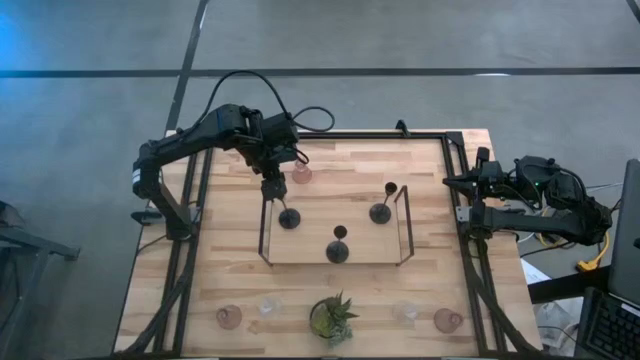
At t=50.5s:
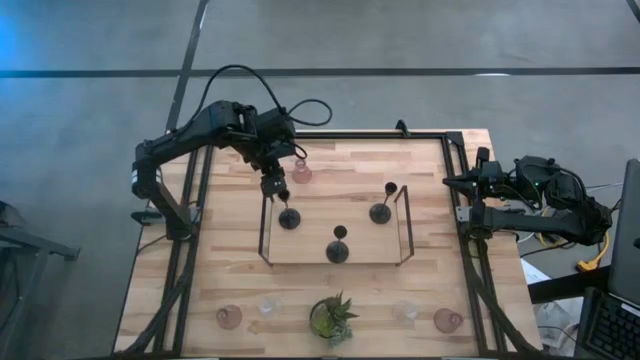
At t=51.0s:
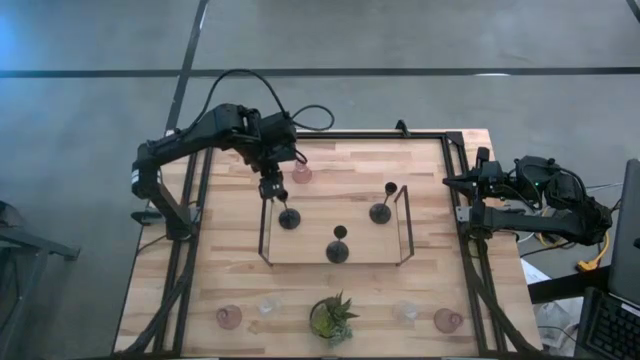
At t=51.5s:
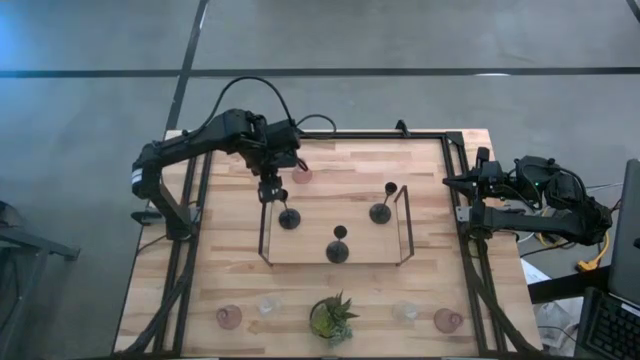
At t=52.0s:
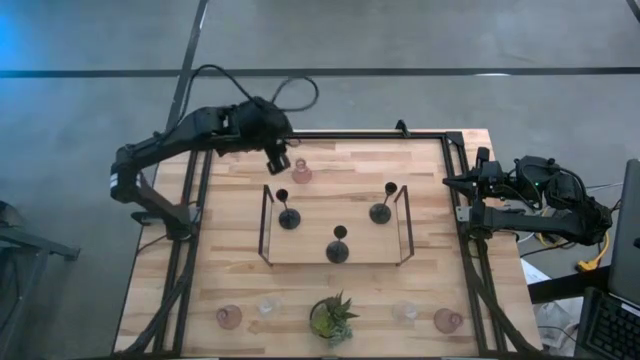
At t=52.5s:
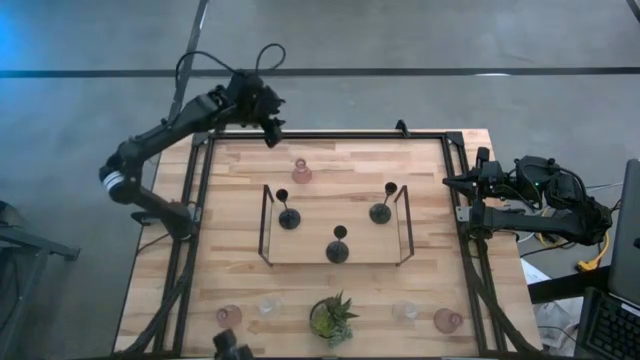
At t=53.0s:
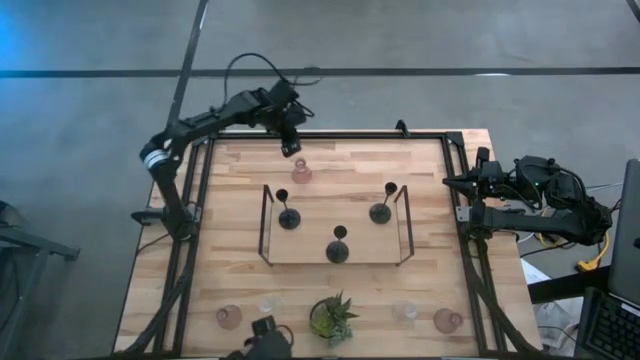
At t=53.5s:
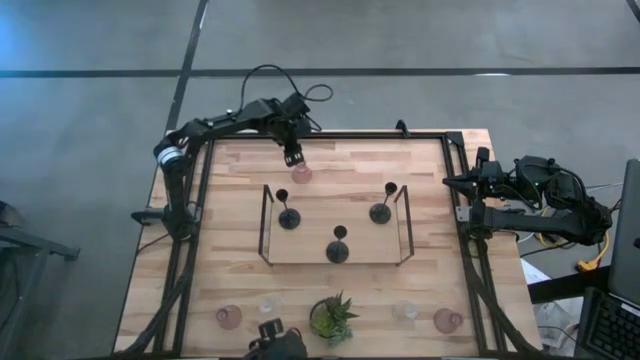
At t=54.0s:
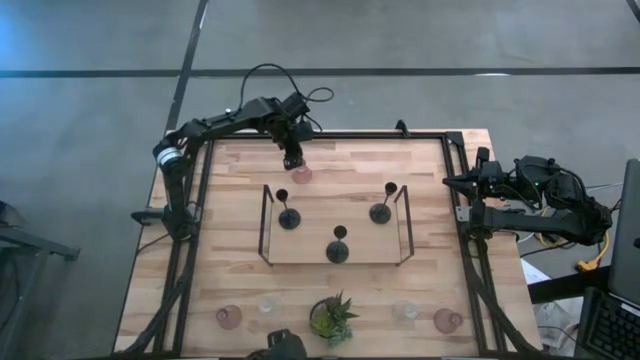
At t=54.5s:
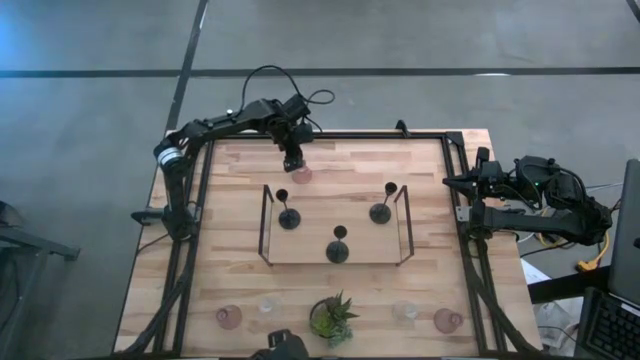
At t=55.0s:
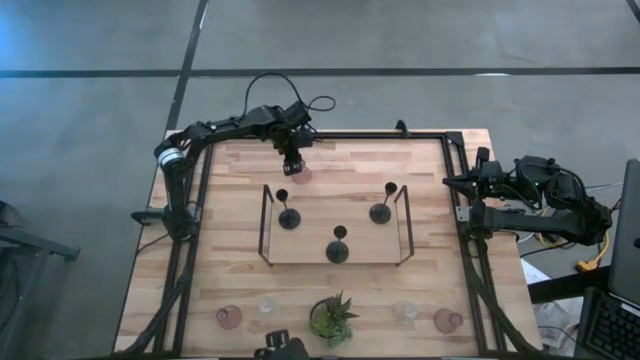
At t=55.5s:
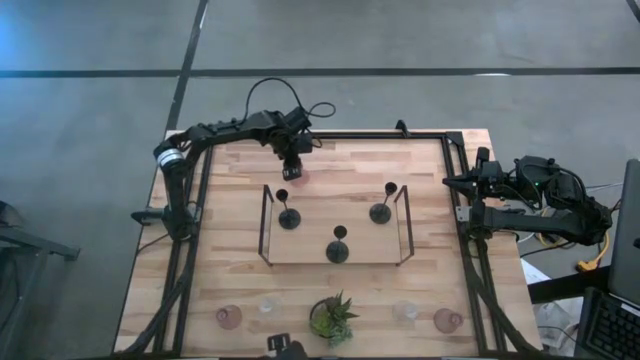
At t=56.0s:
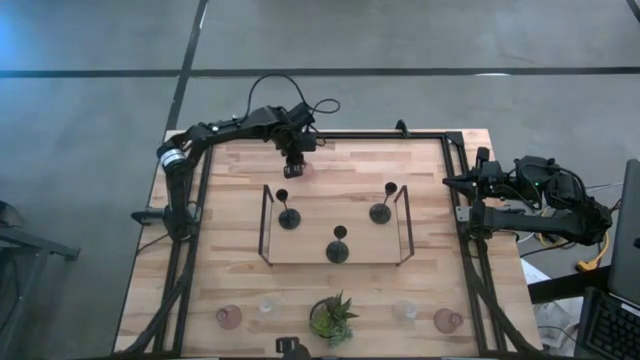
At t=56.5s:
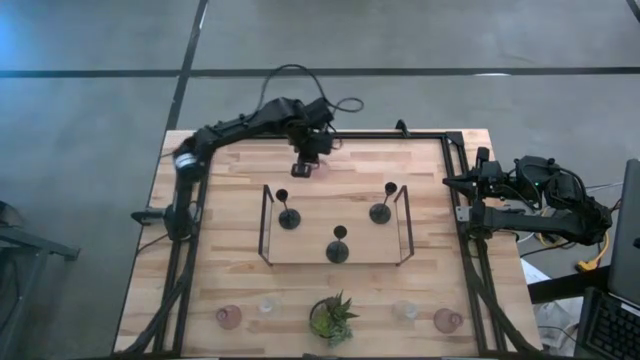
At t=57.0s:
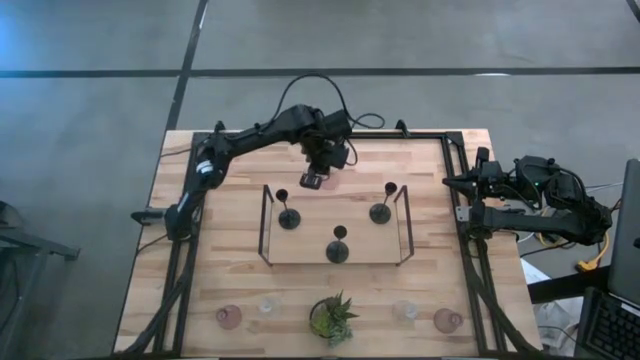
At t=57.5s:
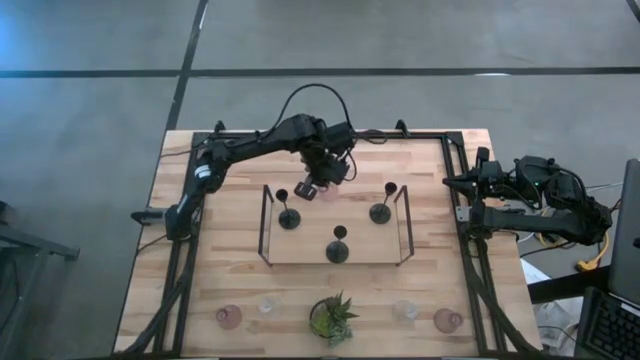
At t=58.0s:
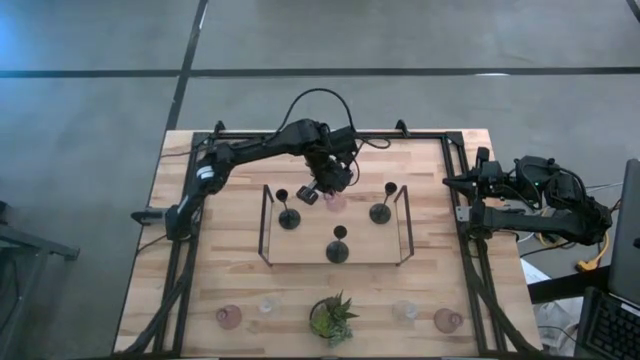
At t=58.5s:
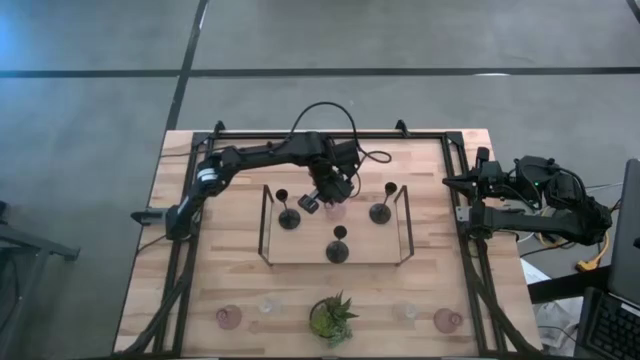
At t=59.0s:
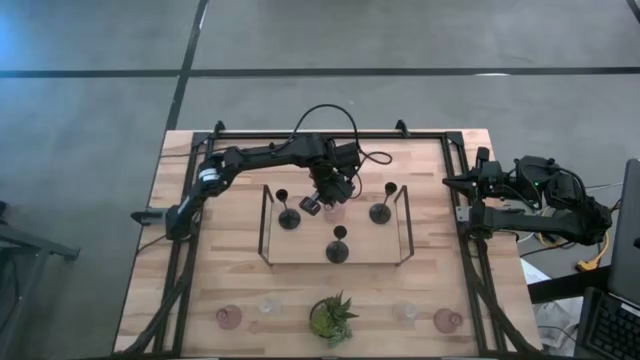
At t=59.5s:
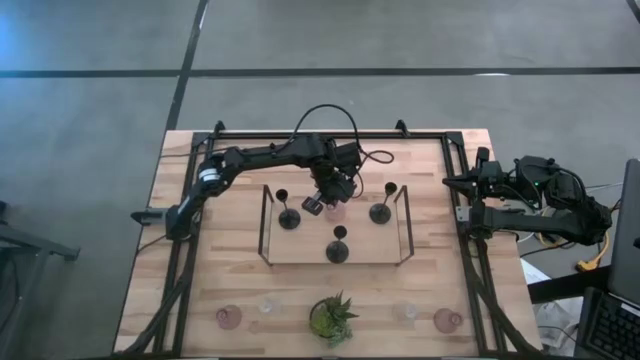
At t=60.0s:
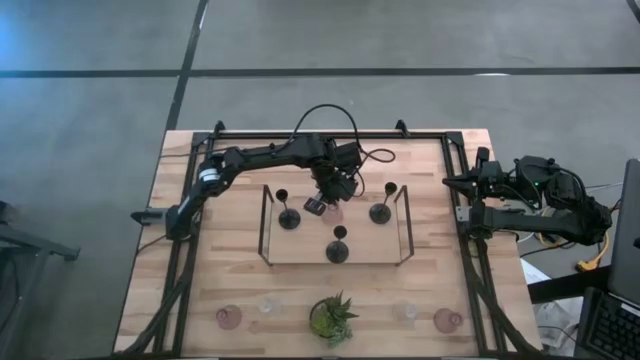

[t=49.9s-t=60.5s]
Task: Pick & Place candle stick holders
Put the top pink glass candle holder on the shelf

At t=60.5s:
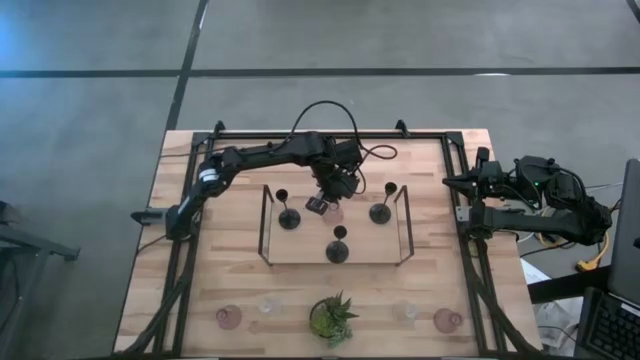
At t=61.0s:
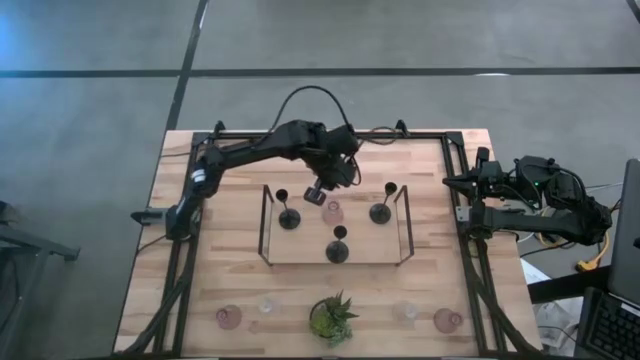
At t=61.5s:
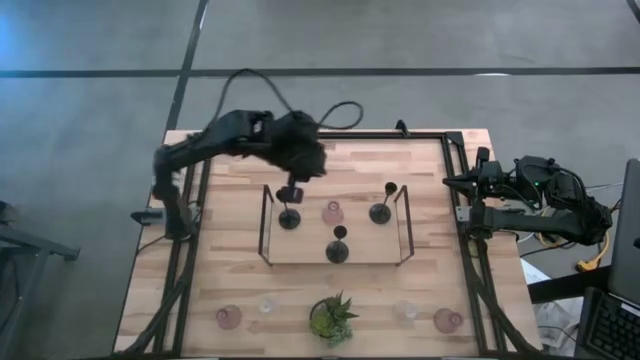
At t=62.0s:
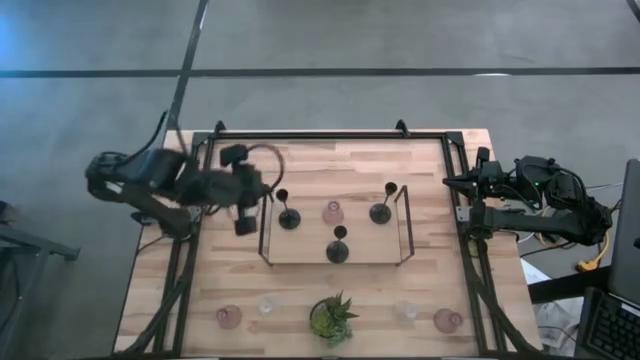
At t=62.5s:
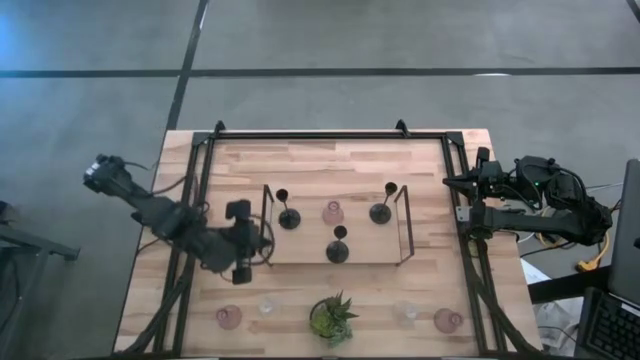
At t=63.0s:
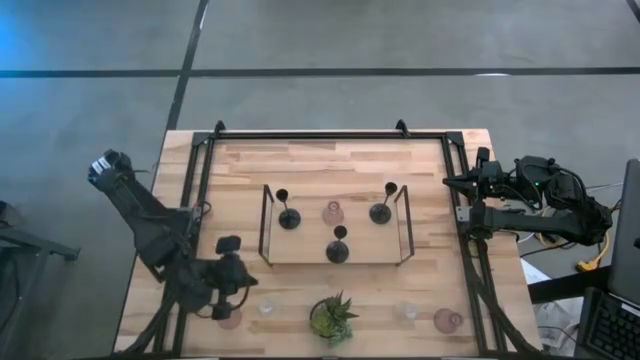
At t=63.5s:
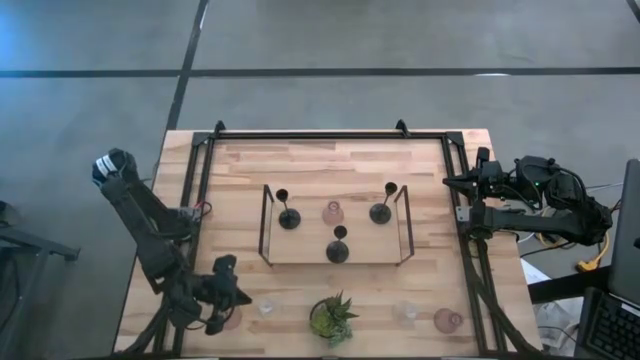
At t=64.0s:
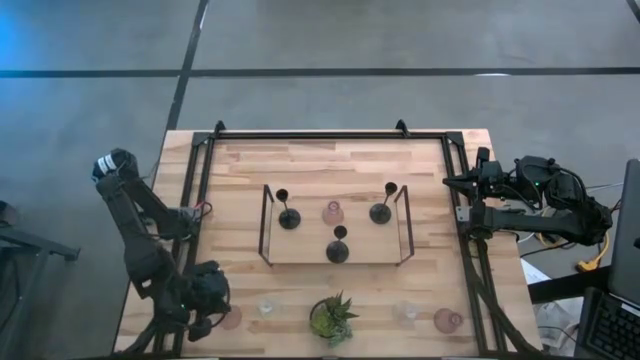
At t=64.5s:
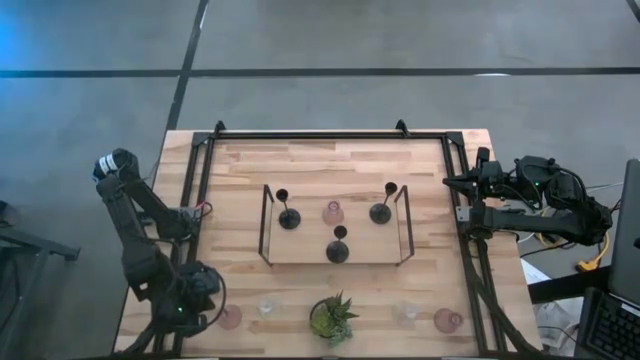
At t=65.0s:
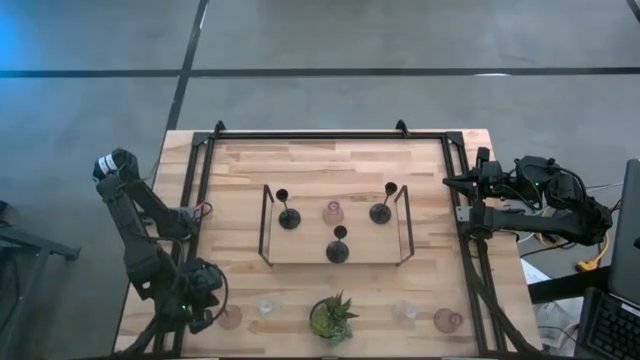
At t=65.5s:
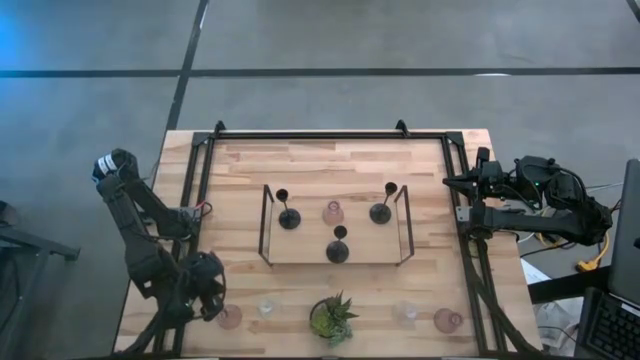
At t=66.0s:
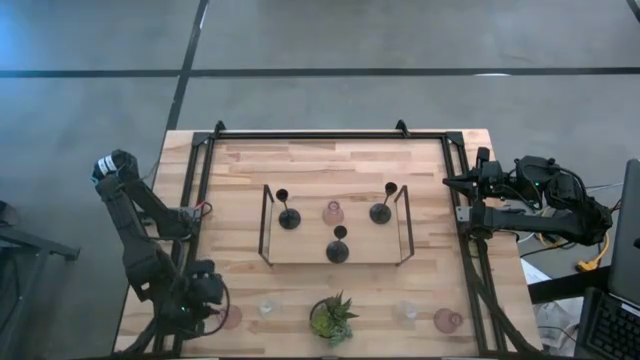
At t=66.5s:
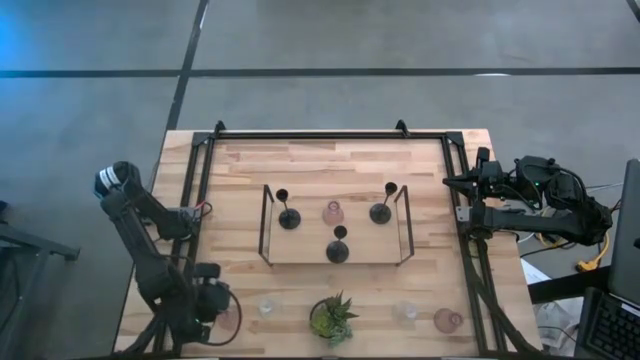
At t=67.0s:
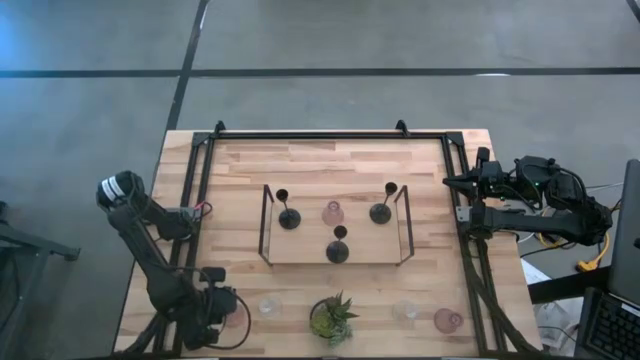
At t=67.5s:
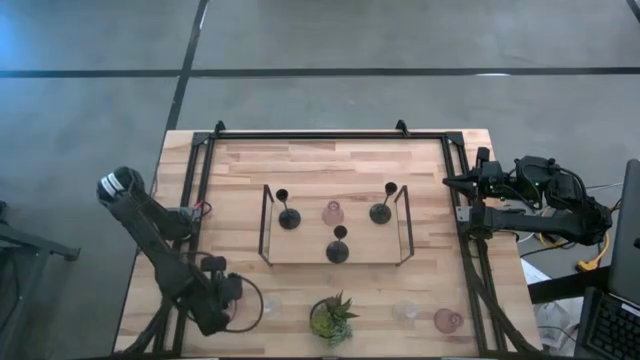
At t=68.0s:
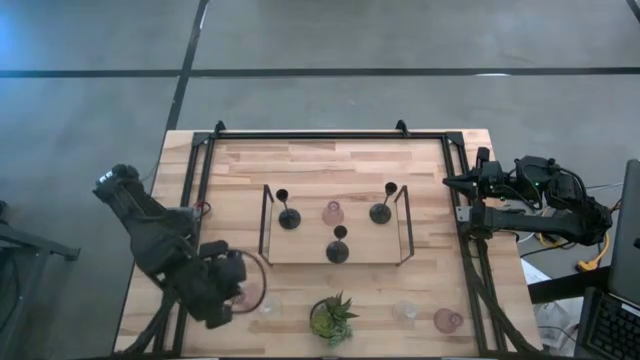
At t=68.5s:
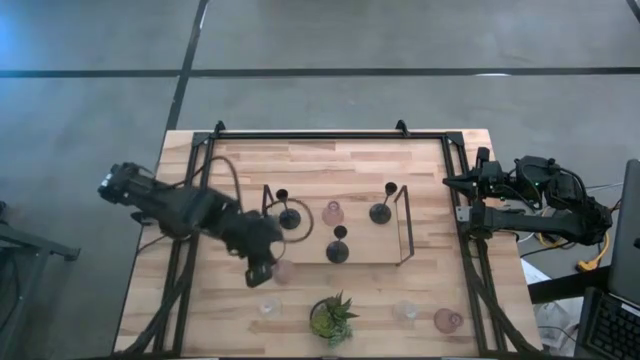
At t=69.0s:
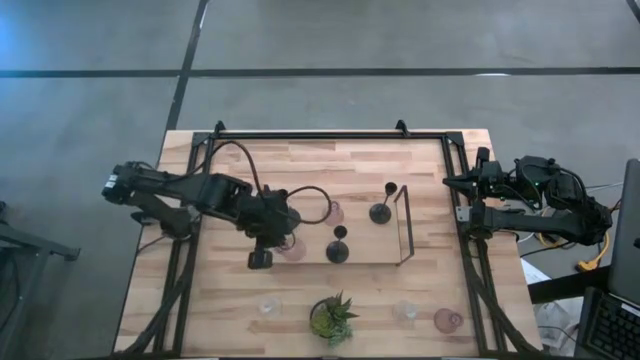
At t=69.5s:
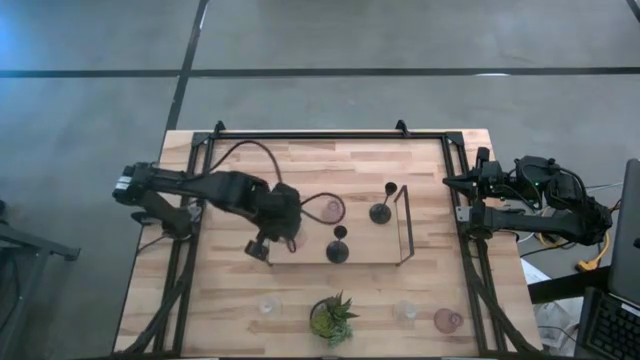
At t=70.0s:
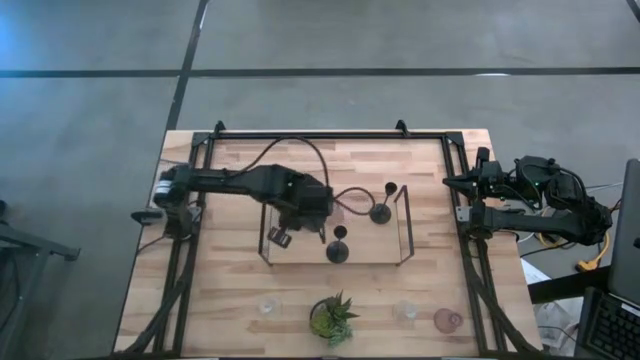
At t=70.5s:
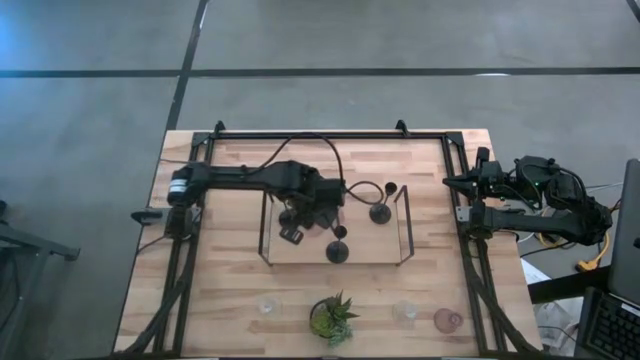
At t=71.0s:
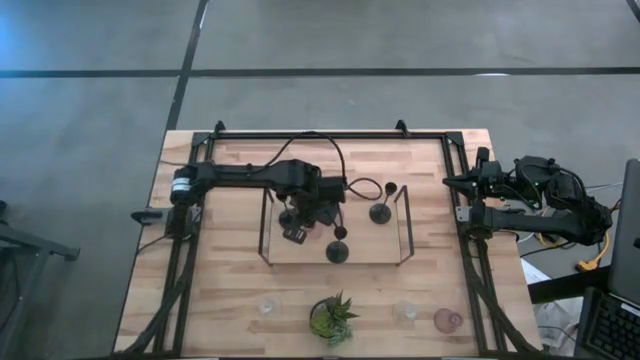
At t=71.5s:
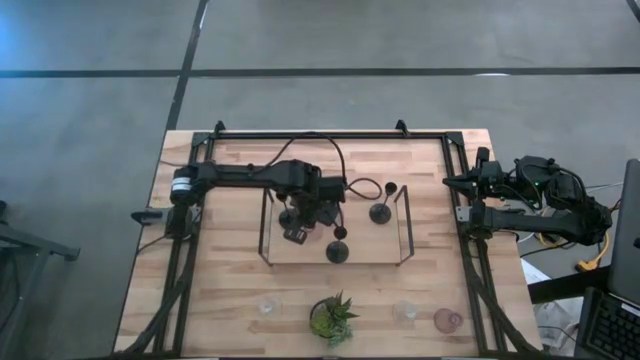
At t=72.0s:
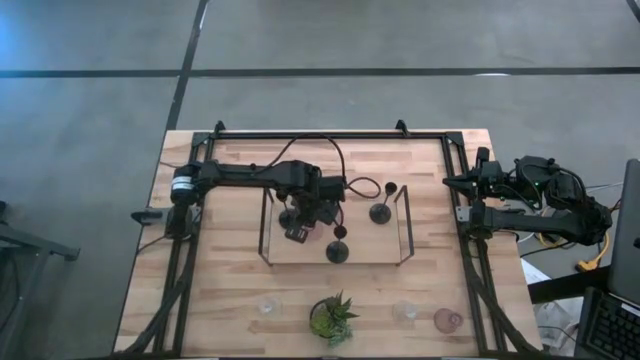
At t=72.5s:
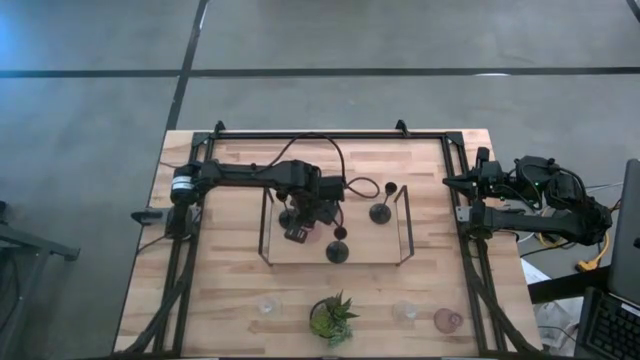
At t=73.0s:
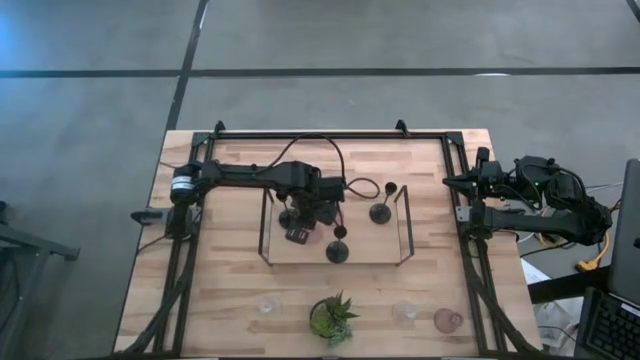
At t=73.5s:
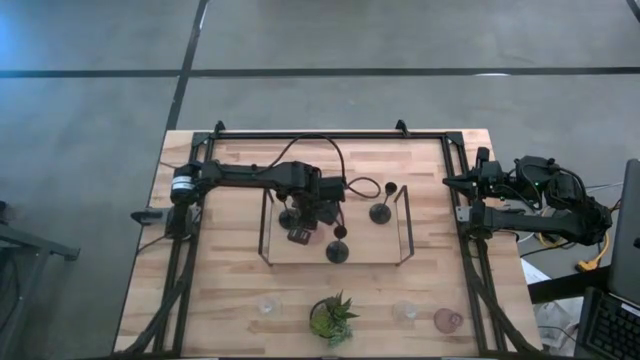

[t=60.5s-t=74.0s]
Put the left pink glass candle holder on the shelf
